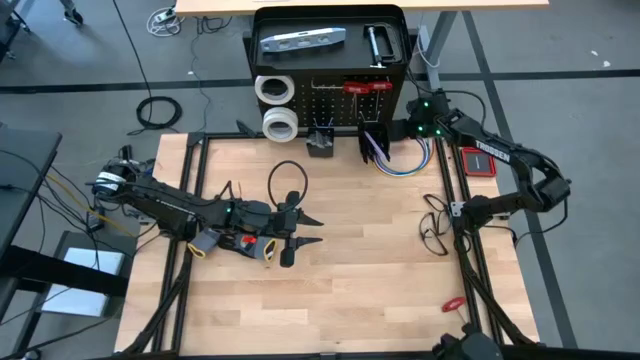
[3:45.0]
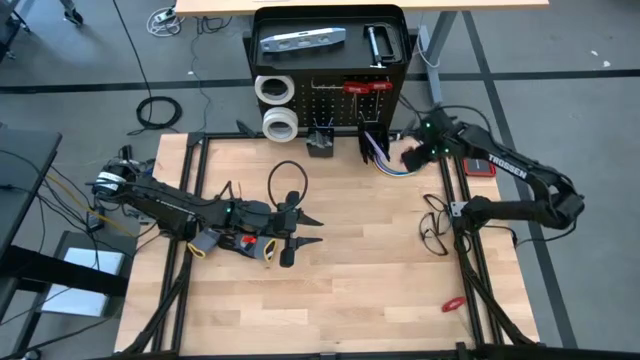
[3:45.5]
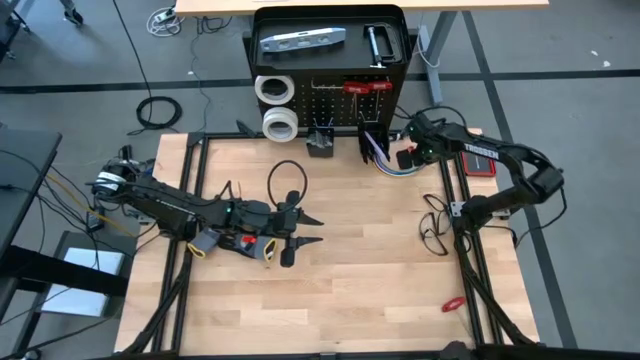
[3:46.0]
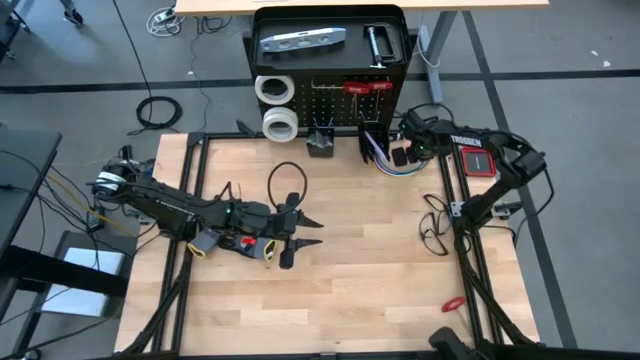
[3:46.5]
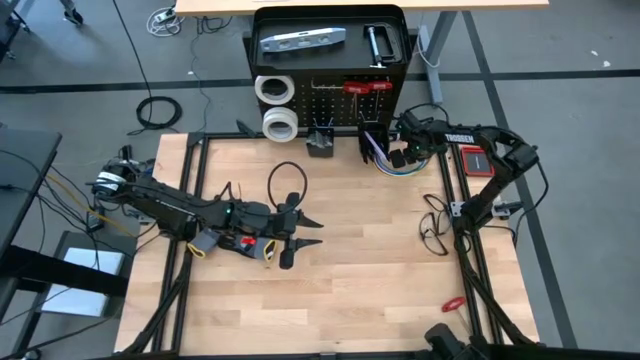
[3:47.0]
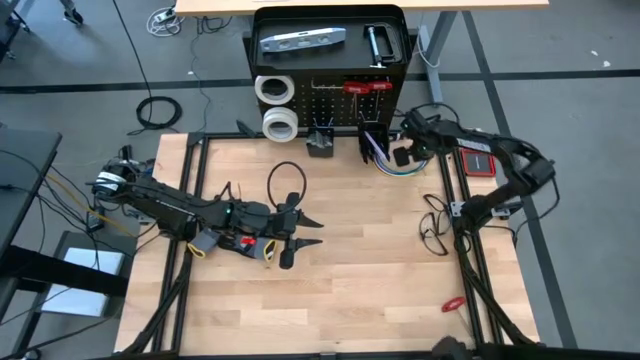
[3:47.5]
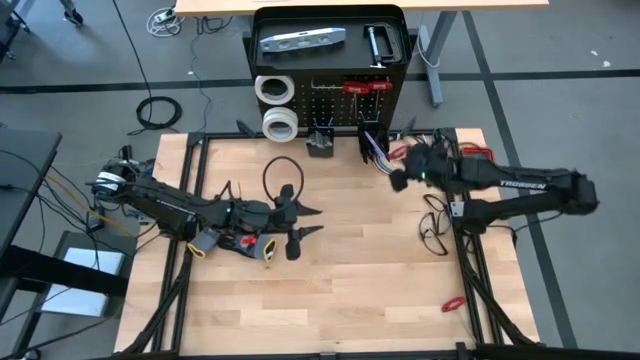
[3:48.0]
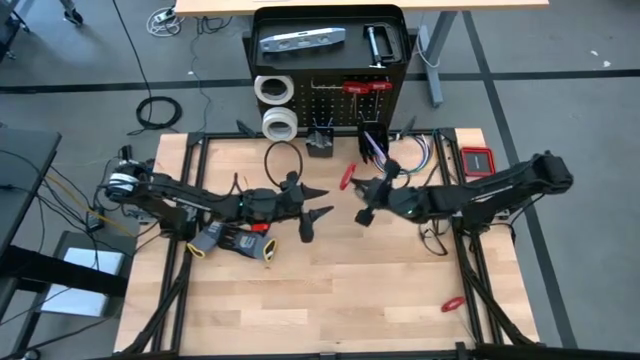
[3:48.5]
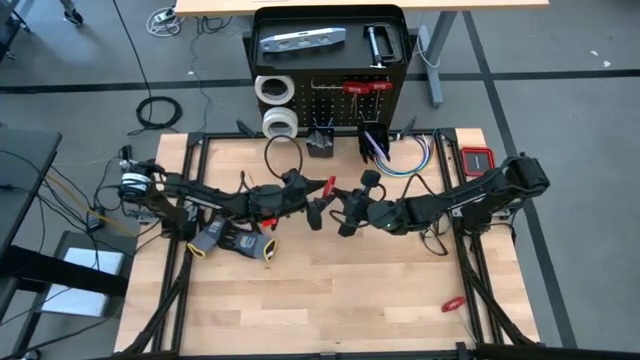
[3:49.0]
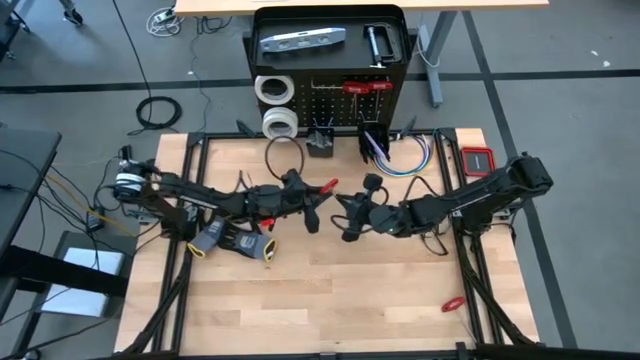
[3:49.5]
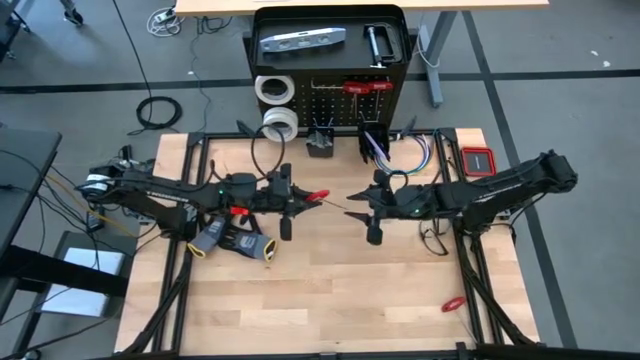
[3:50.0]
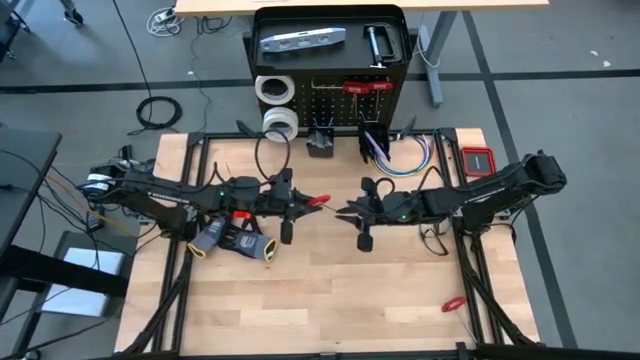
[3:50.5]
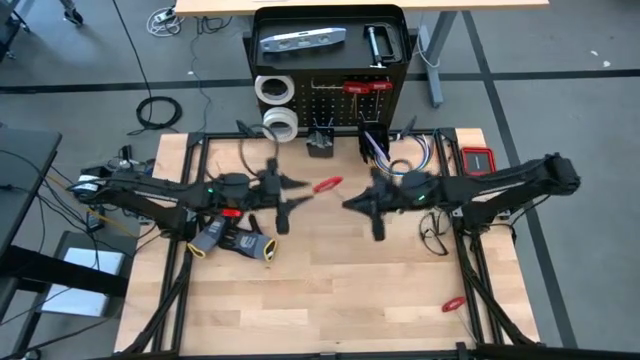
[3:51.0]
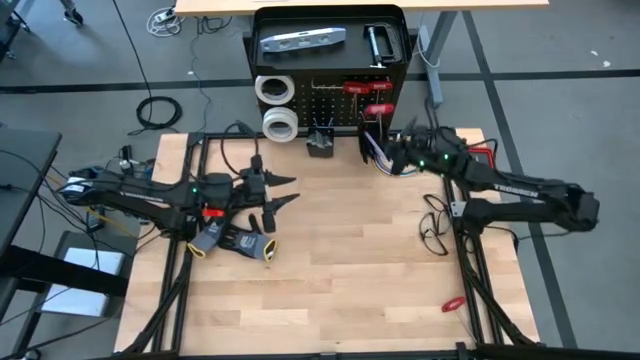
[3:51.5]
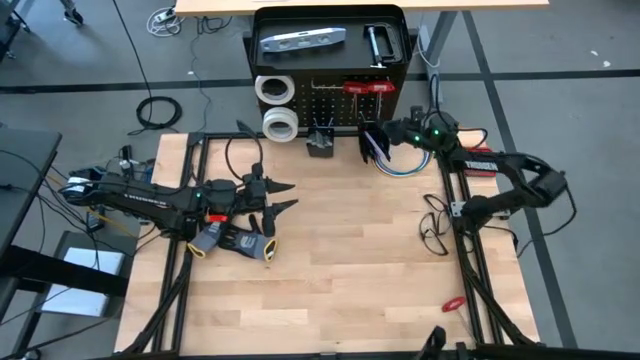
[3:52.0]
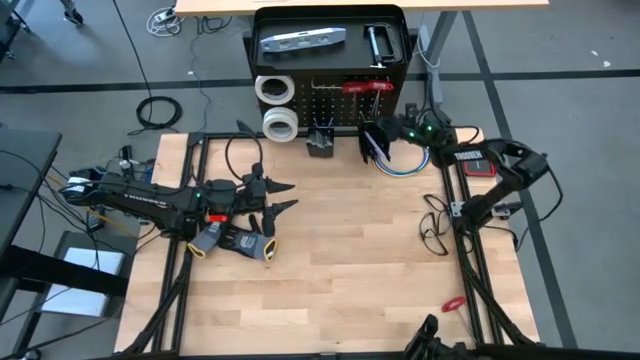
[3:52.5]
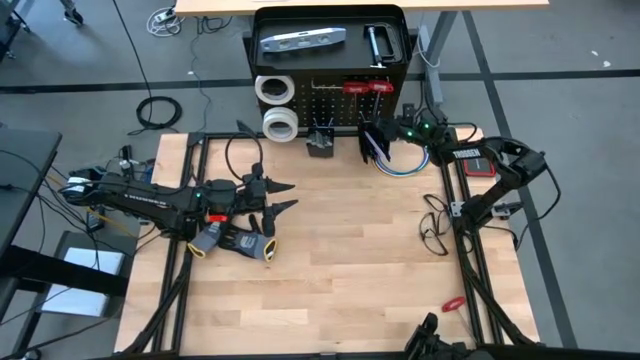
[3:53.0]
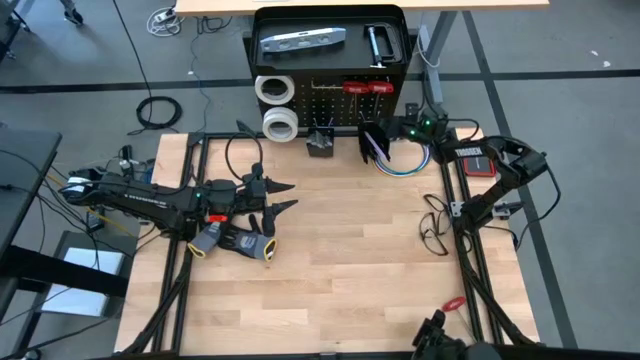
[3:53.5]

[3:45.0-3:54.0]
Task: Hang tools onto peg board
Hang the allen wrench on the peg board

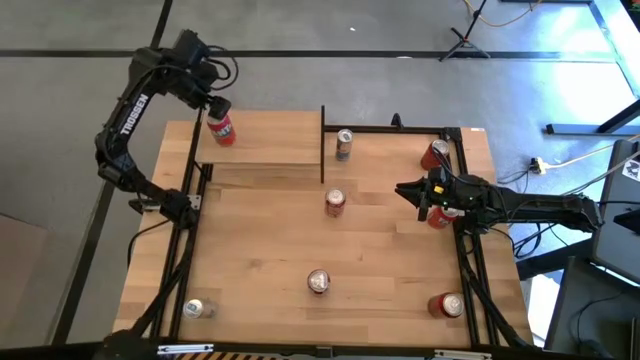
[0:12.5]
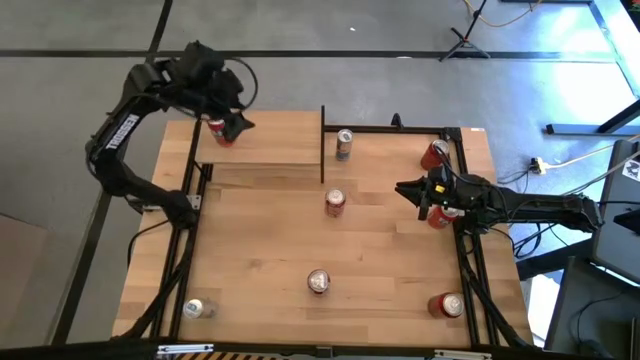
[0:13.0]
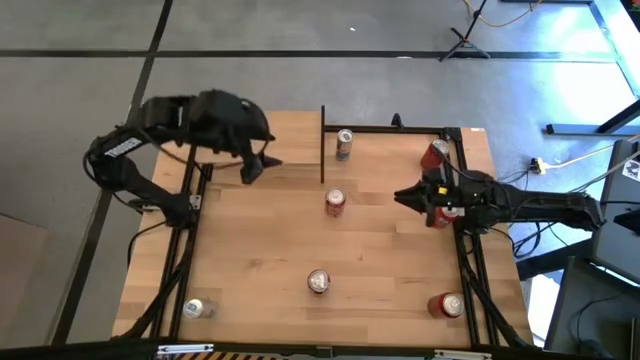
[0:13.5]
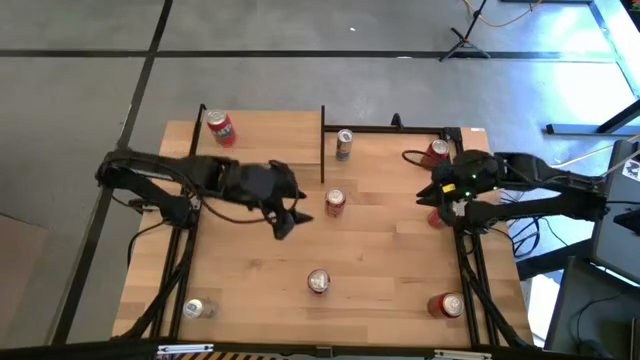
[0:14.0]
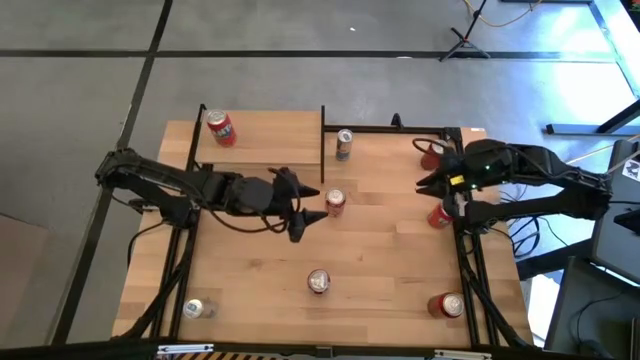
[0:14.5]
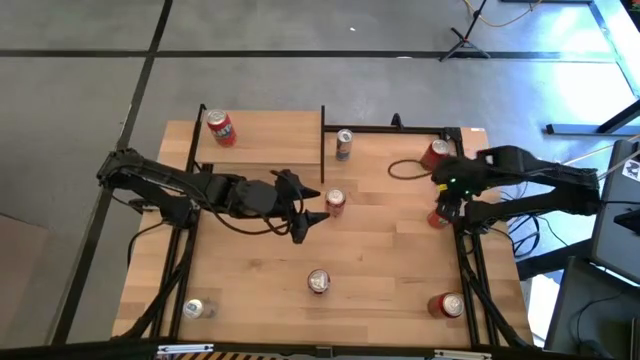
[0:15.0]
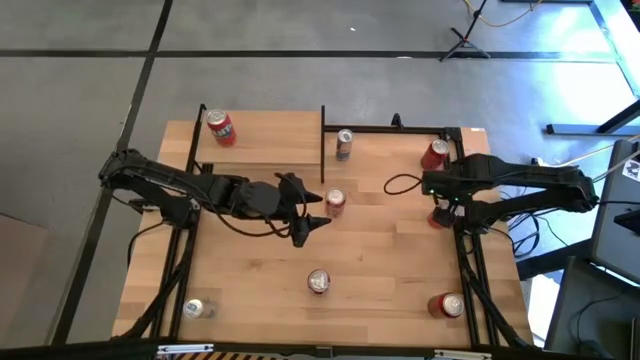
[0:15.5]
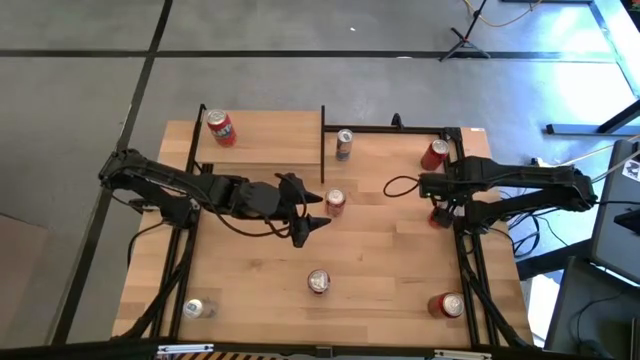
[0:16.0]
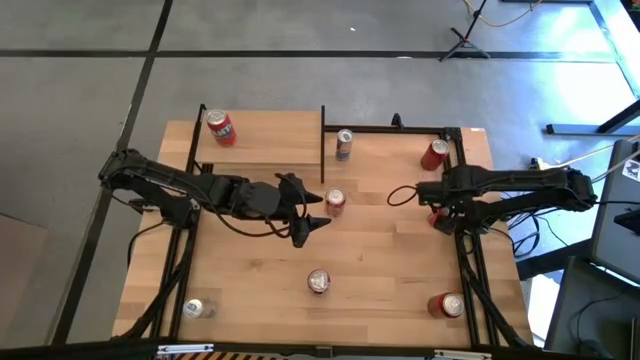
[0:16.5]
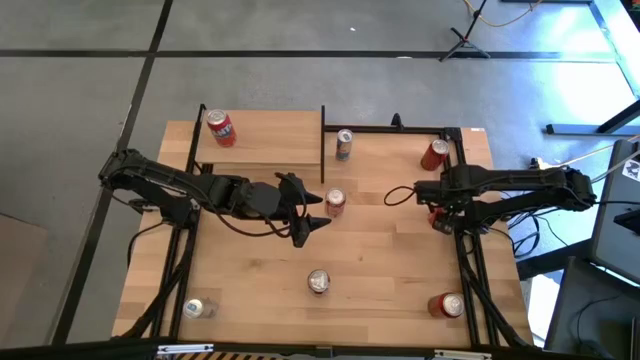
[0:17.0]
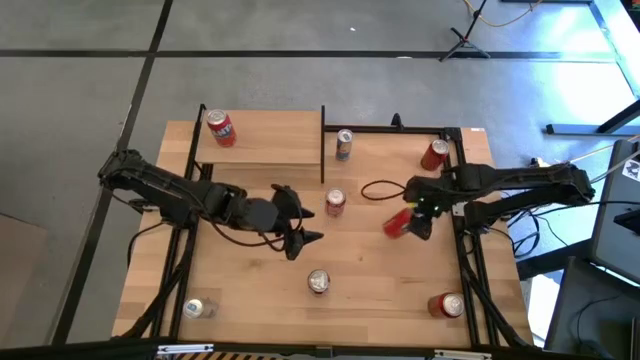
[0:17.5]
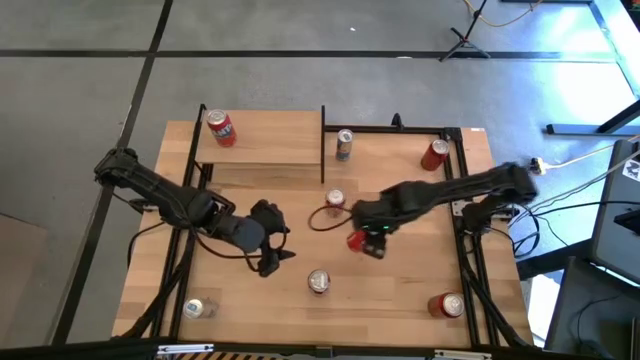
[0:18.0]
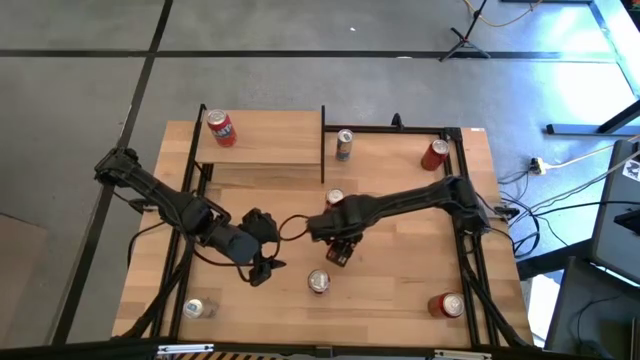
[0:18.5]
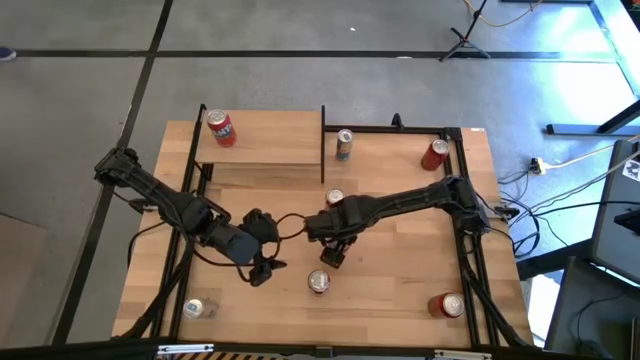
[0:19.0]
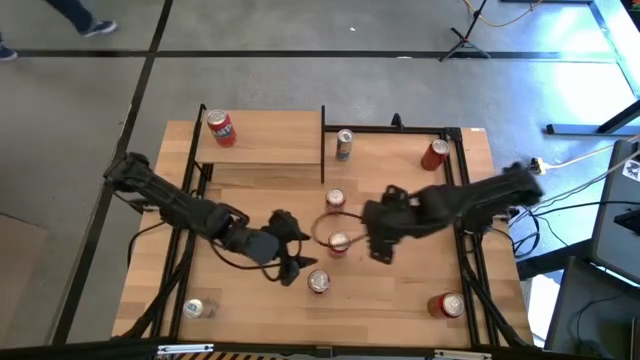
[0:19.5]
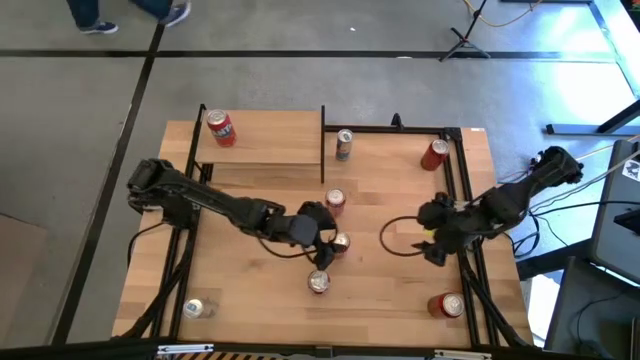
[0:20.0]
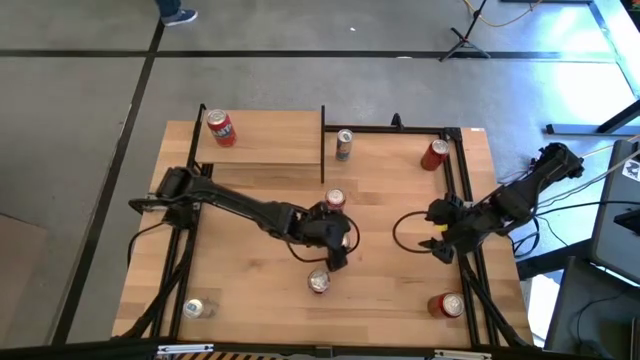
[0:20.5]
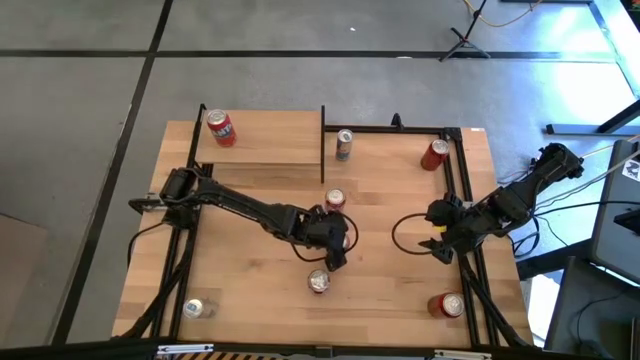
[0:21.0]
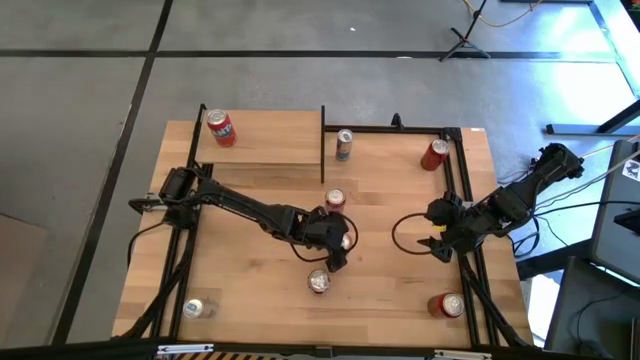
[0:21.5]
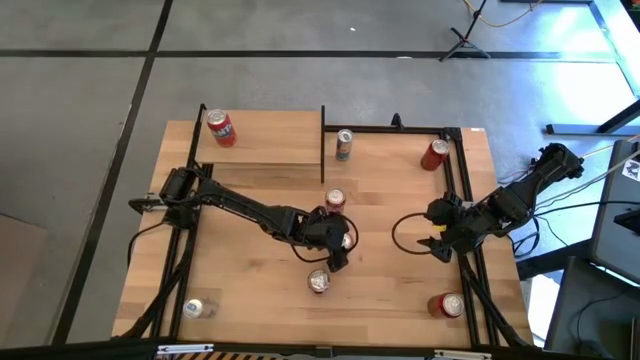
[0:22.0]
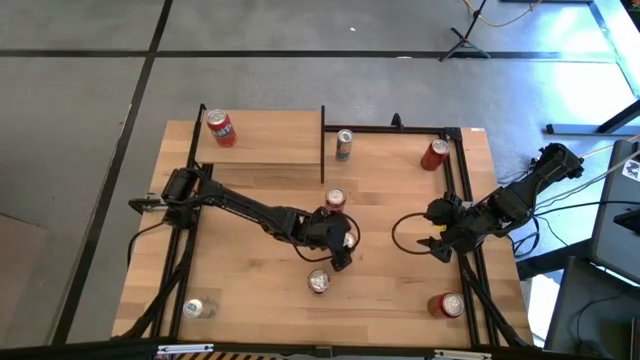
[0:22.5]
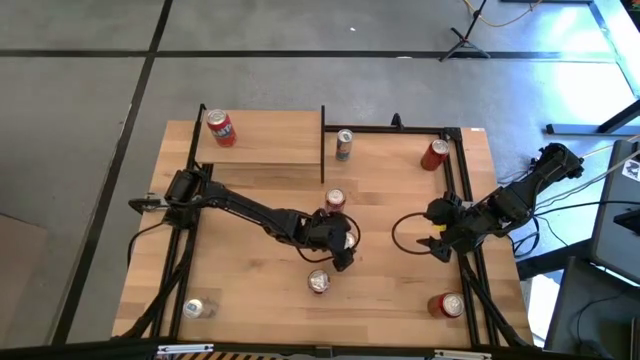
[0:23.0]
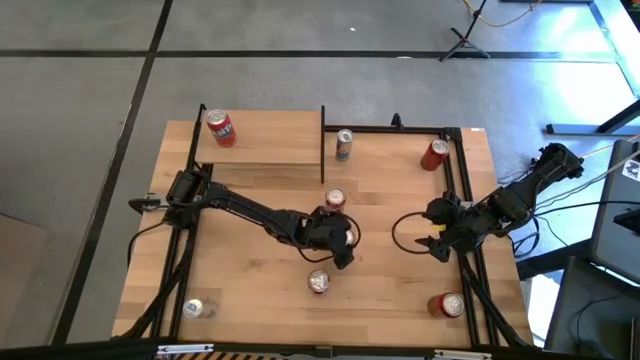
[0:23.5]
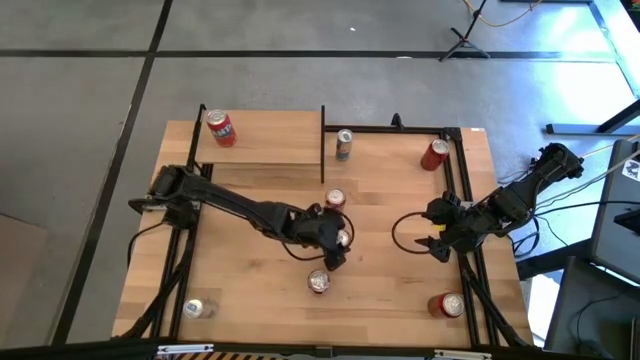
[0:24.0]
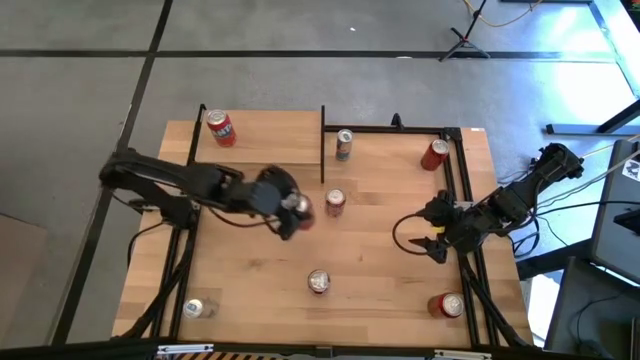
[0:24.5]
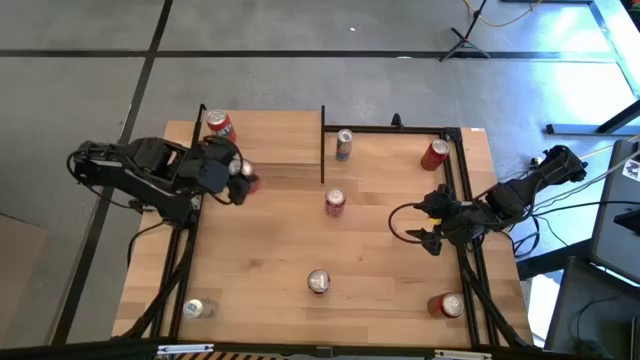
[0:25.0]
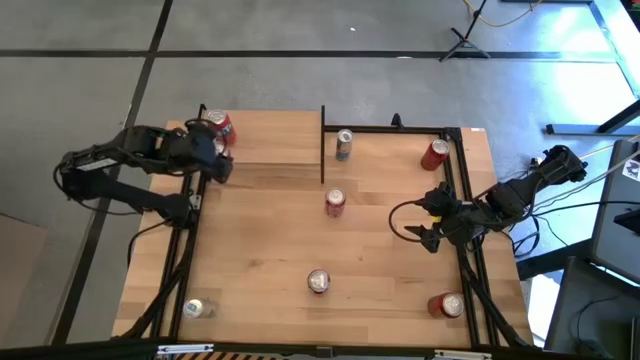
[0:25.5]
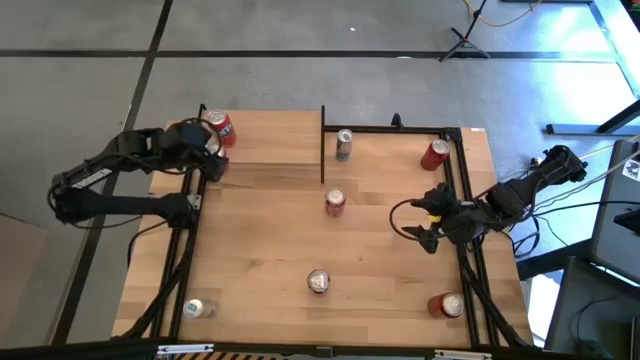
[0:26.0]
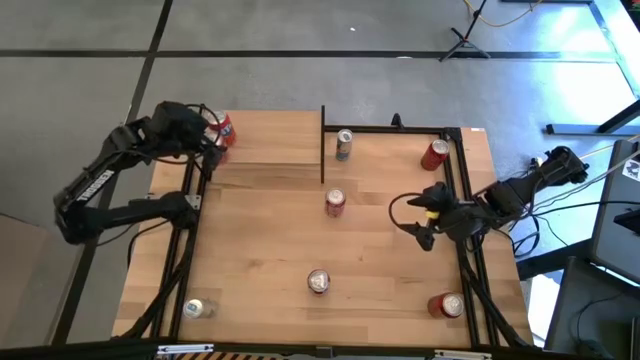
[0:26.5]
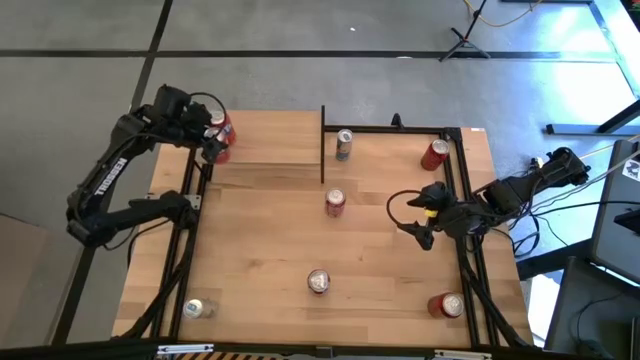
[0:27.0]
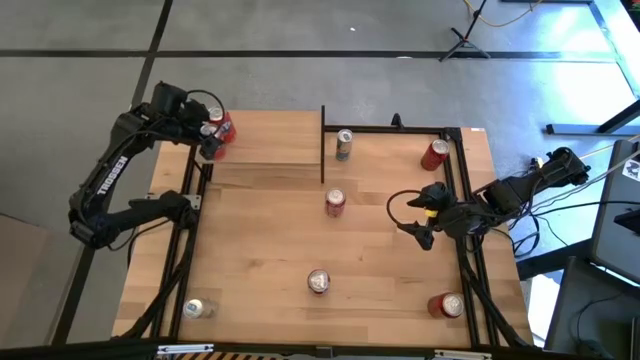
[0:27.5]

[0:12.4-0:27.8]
Task: Place canned beverage on shelf
Put the orange soda can on the shelf aligned with the other orange soda can
